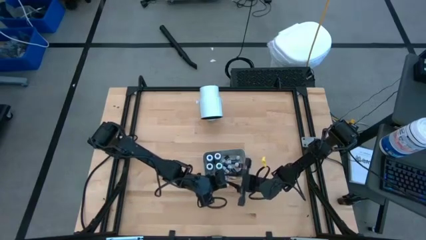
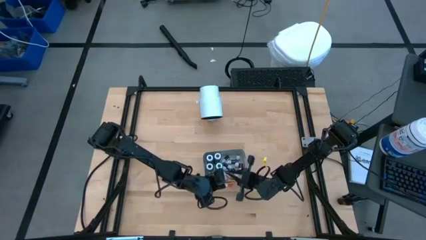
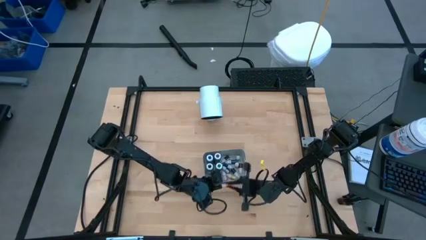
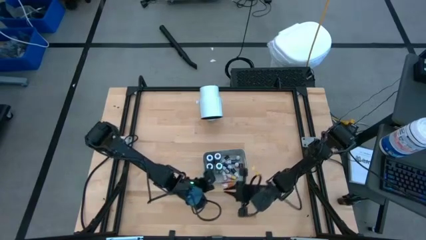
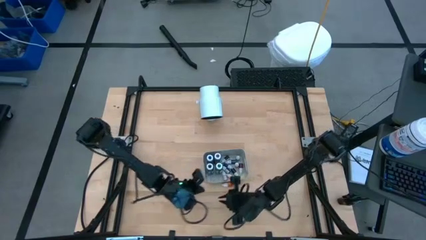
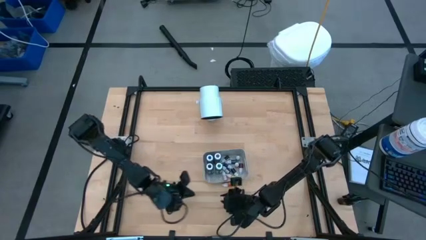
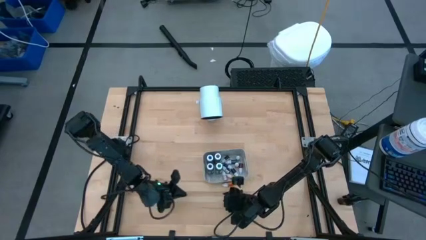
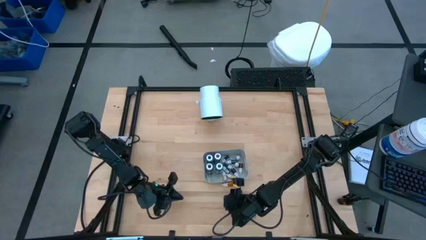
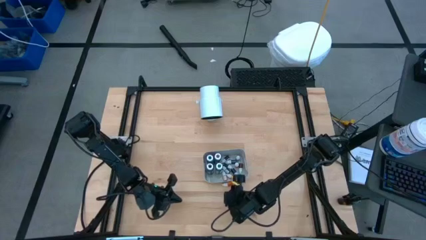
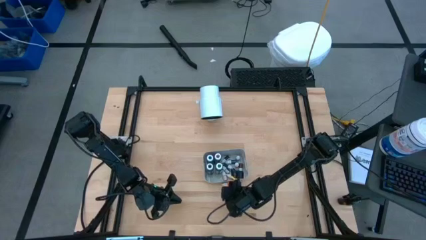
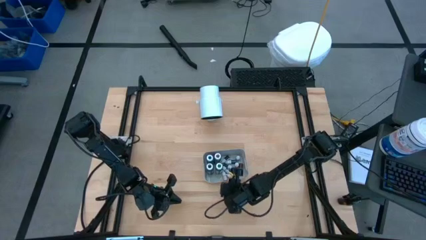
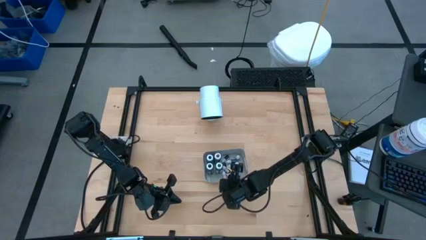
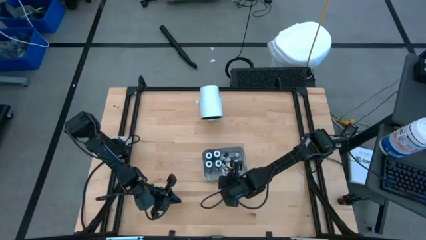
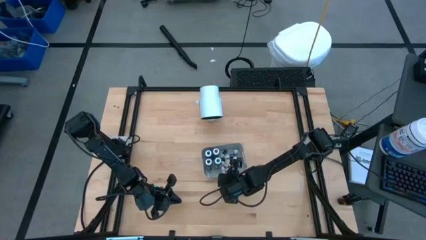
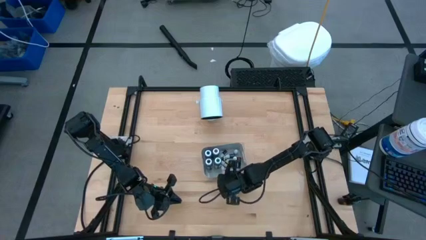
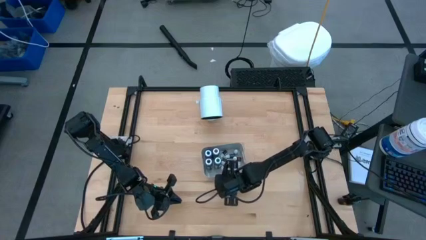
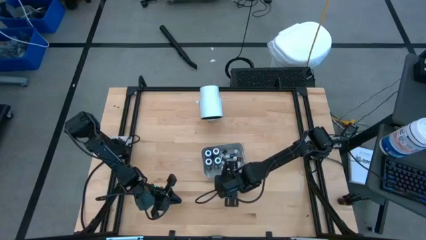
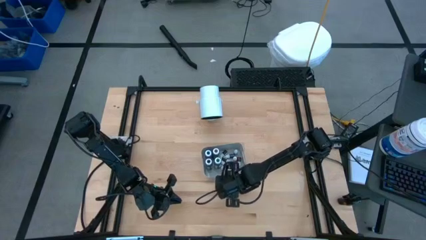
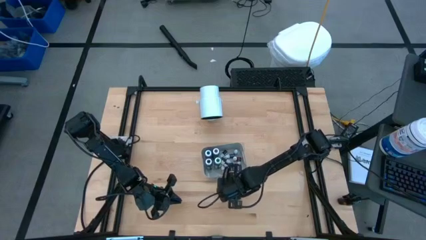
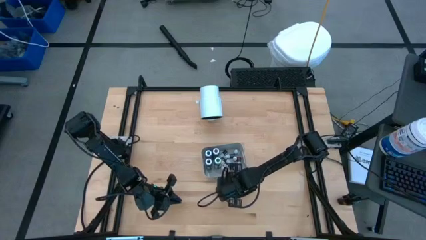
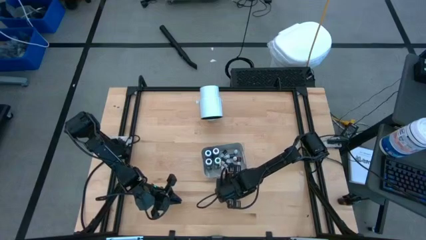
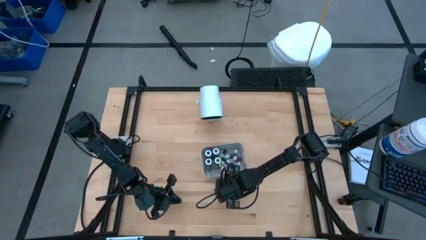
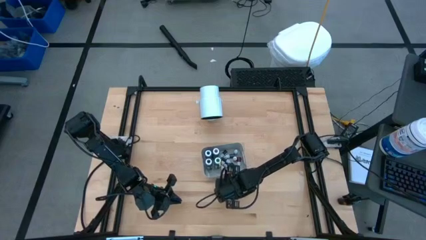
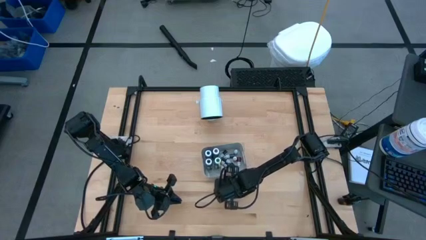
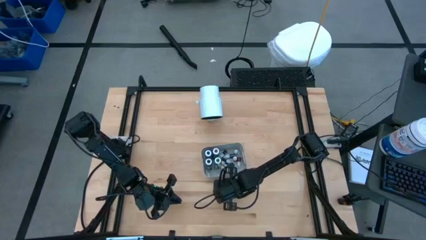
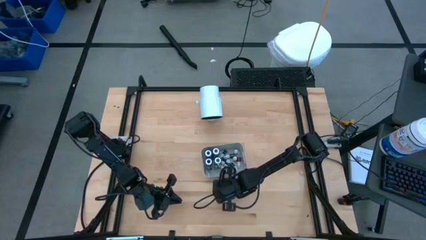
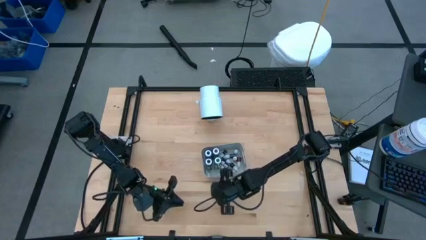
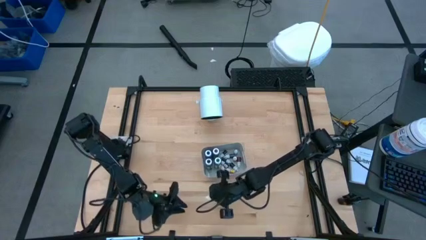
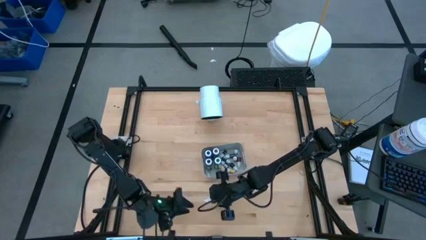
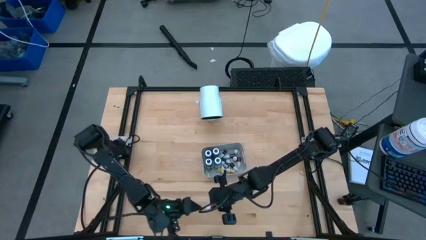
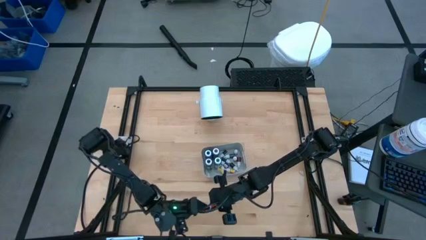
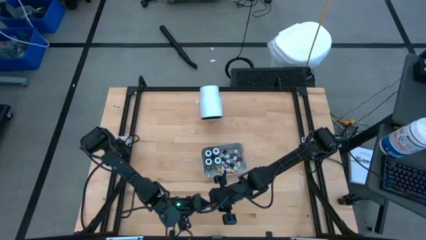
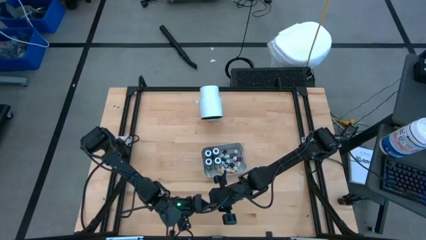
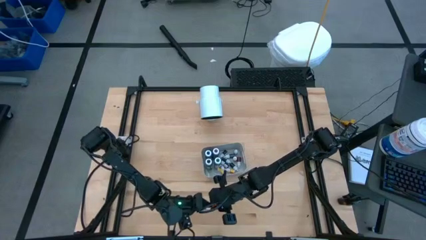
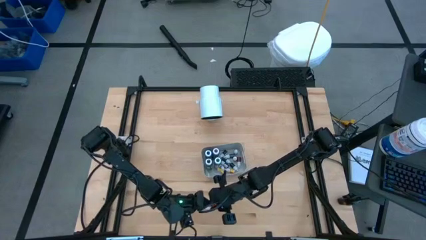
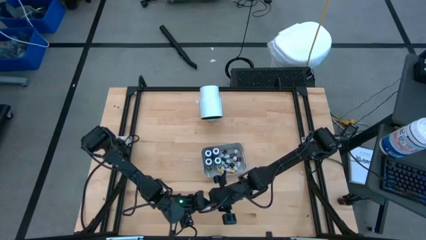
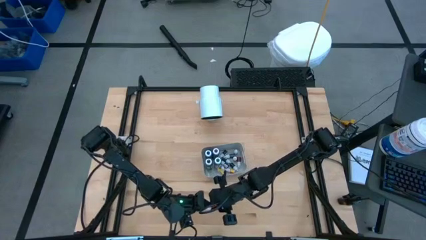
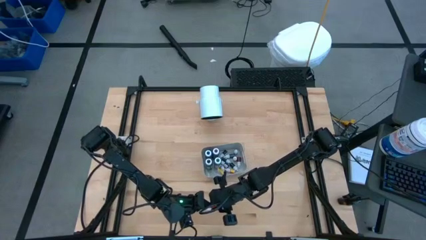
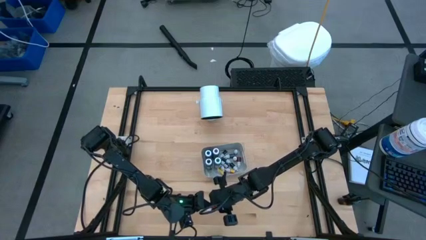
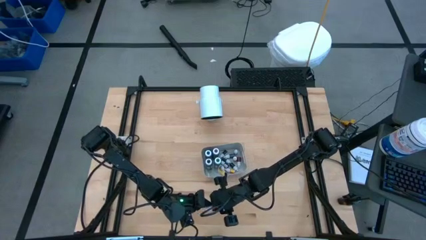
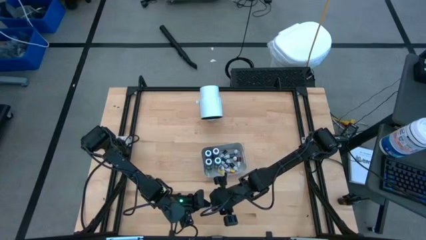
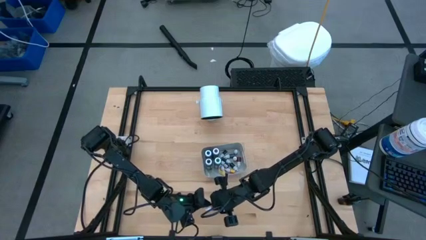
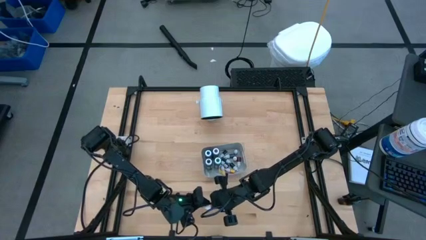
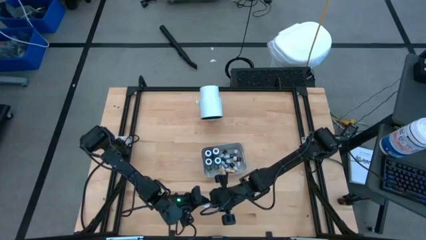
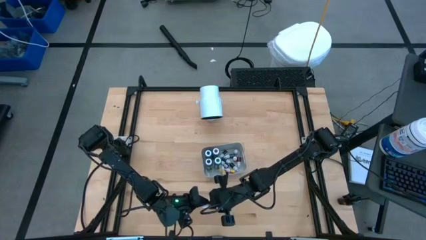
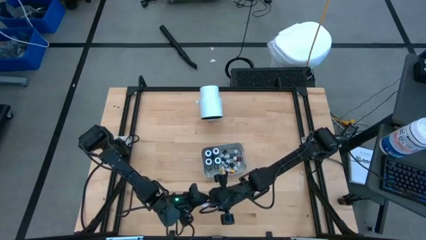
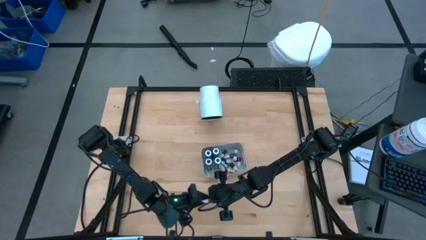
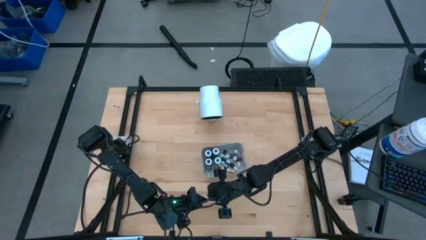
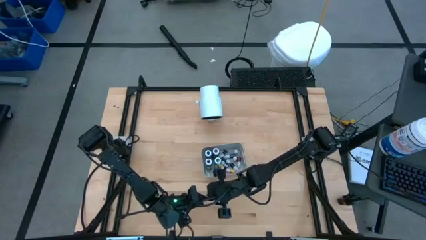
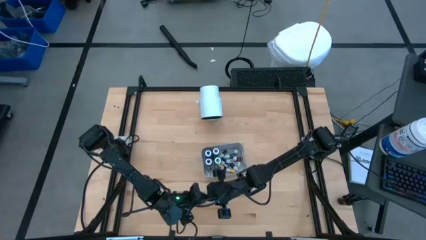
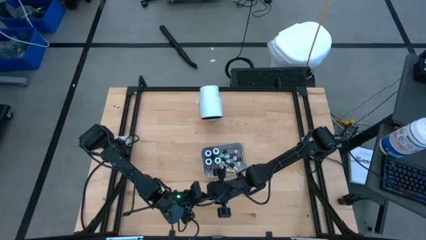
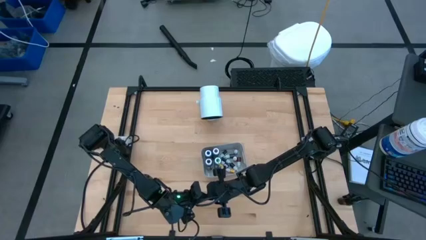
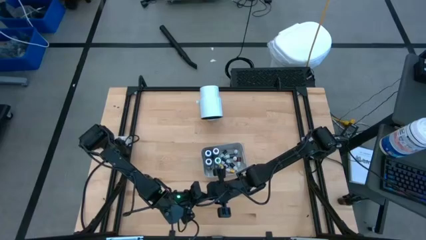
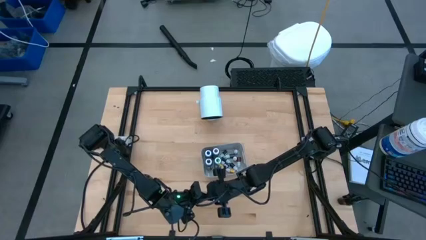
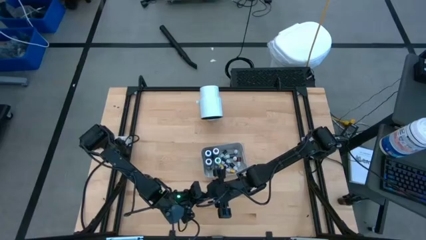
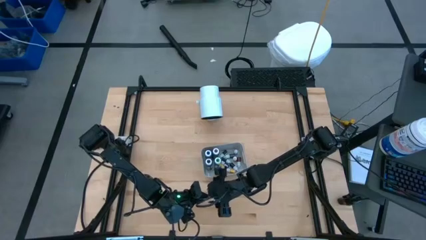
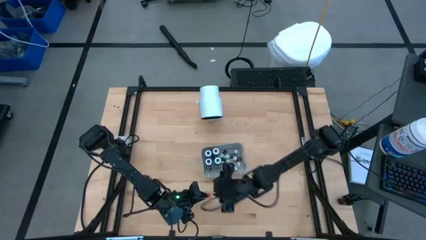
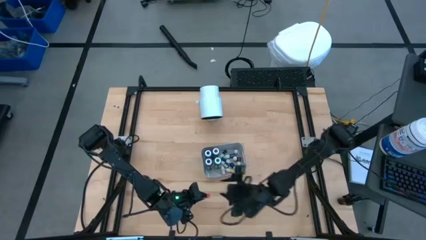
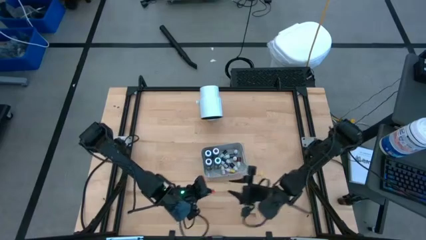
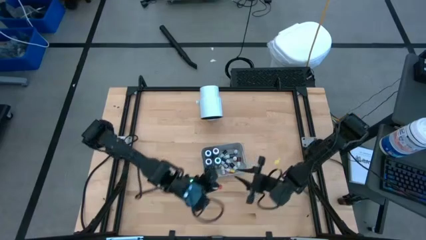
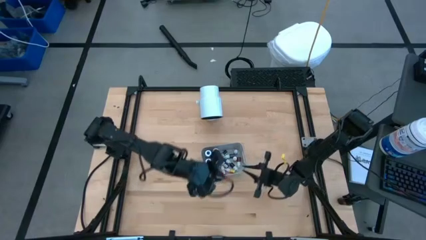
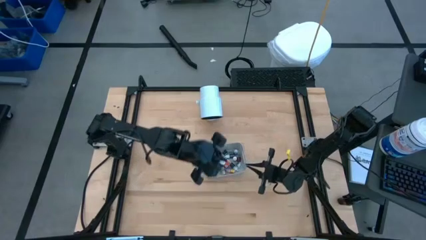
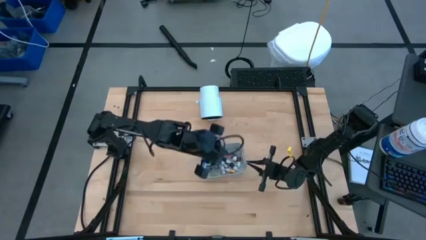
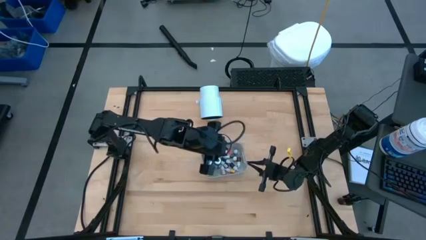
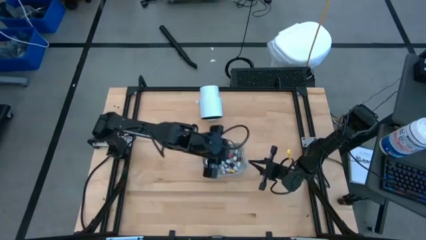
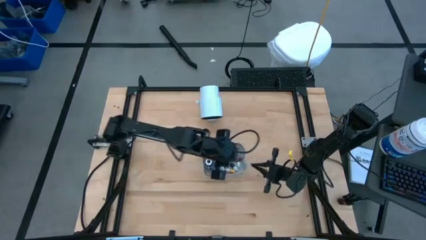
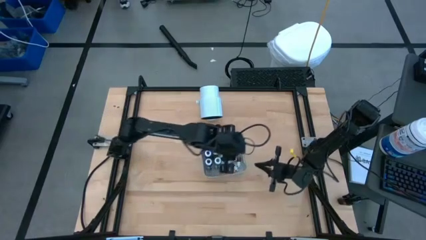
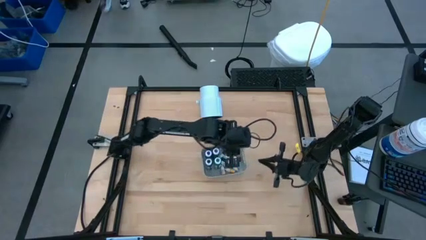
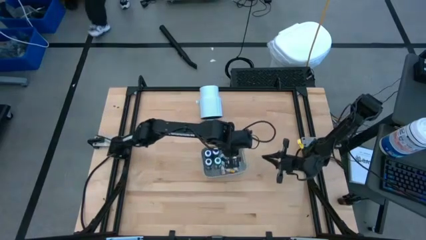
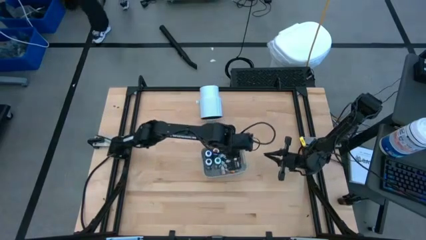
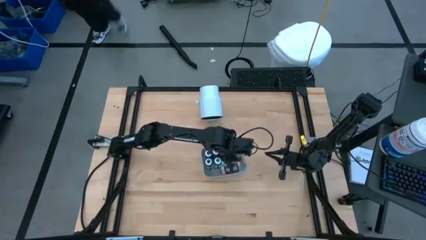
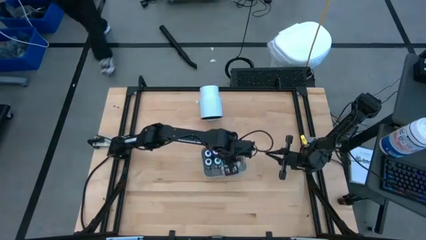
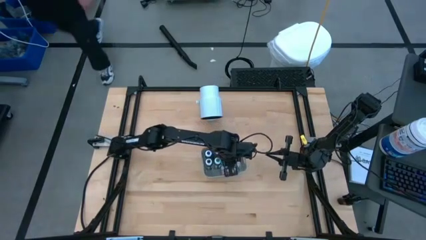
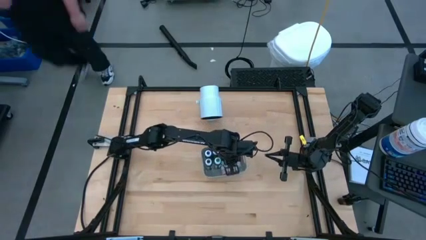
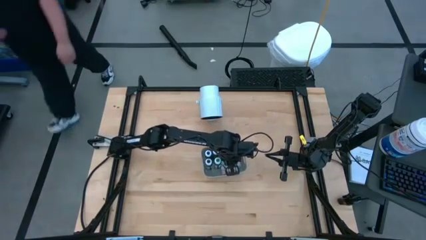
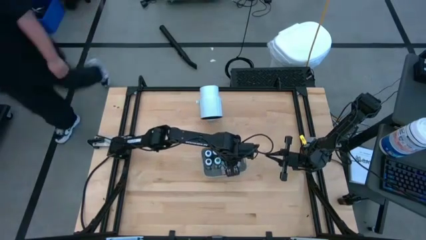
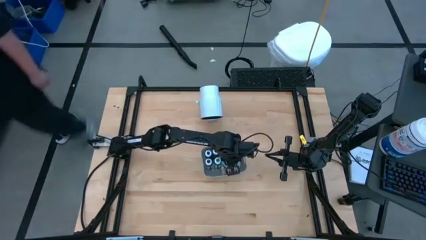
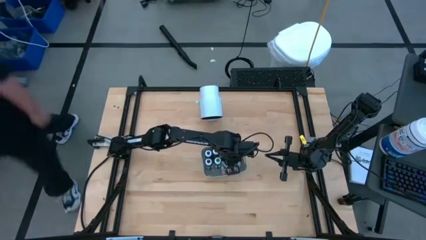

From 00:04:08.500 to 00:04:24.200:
Task: Pick & Place food coloring
Put the orange food coloring bottle into the gray bin
